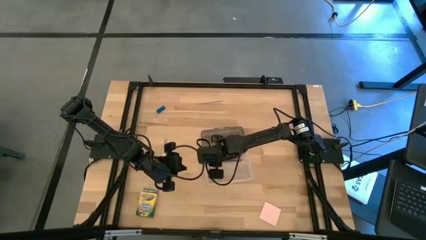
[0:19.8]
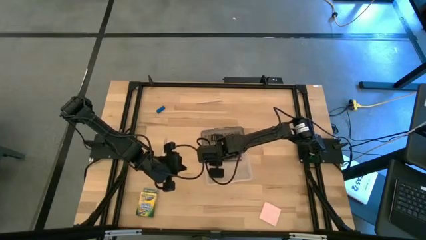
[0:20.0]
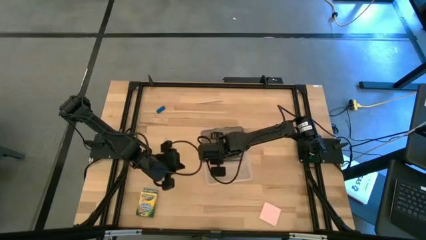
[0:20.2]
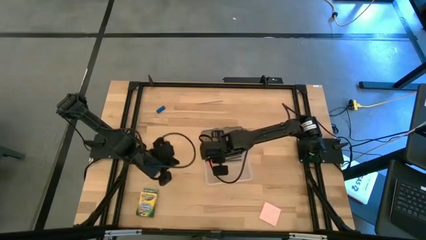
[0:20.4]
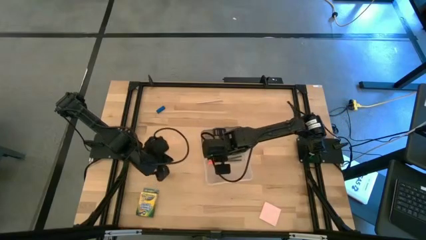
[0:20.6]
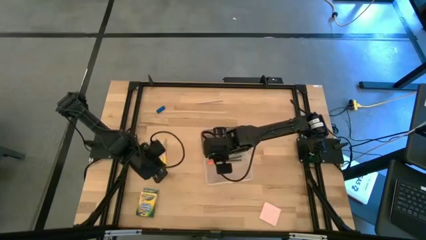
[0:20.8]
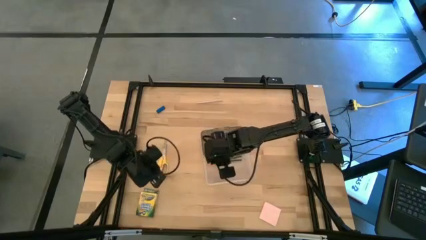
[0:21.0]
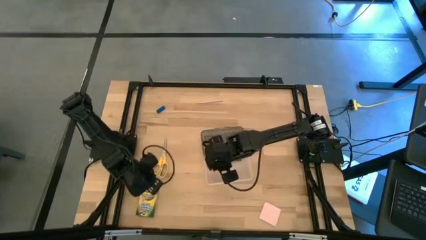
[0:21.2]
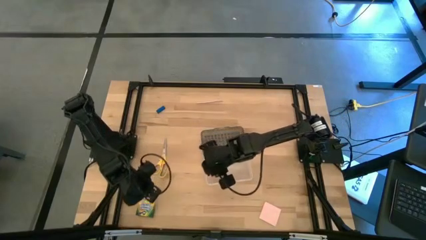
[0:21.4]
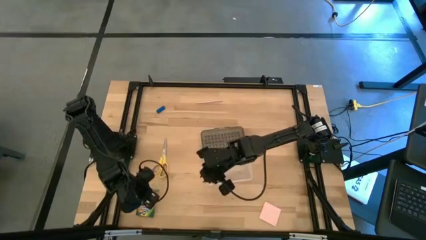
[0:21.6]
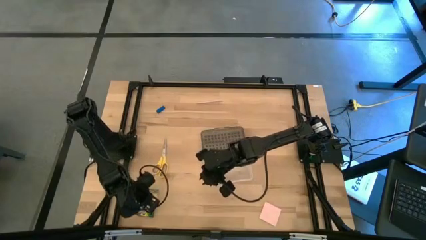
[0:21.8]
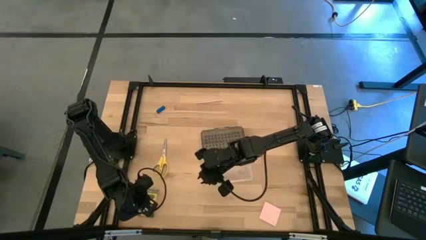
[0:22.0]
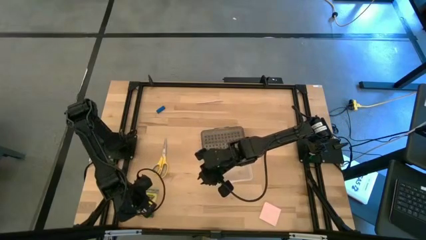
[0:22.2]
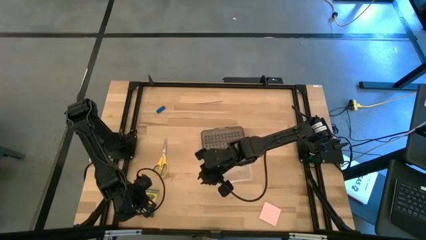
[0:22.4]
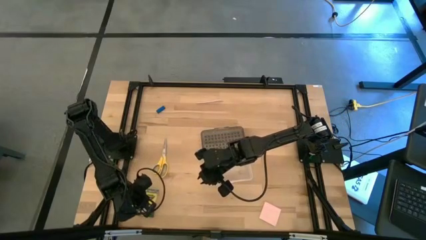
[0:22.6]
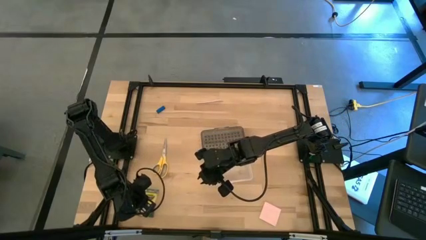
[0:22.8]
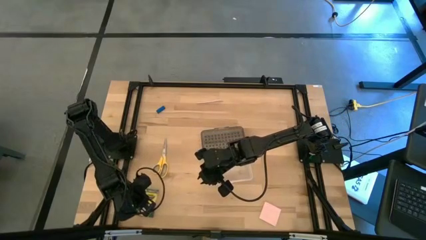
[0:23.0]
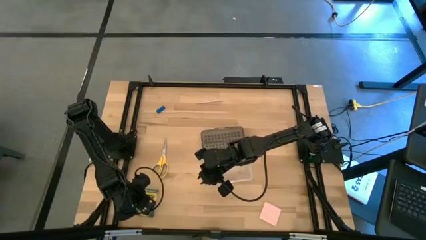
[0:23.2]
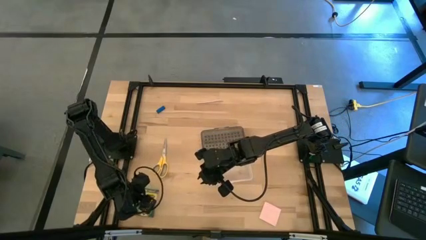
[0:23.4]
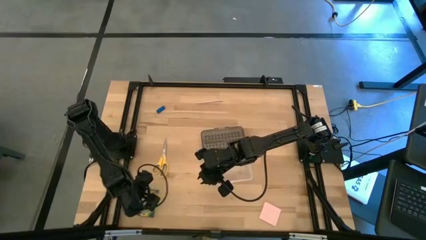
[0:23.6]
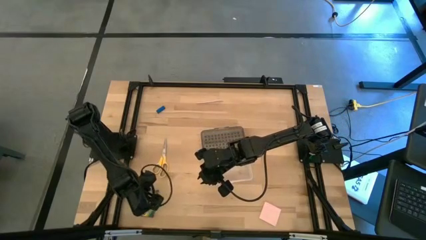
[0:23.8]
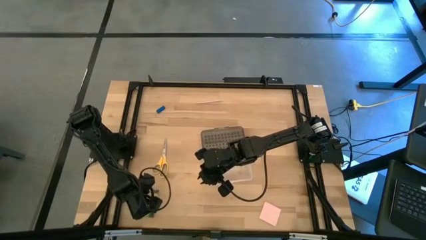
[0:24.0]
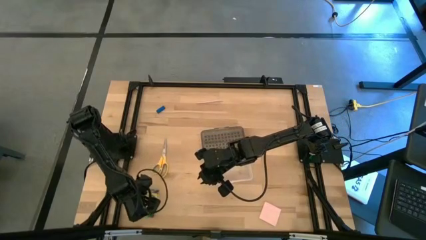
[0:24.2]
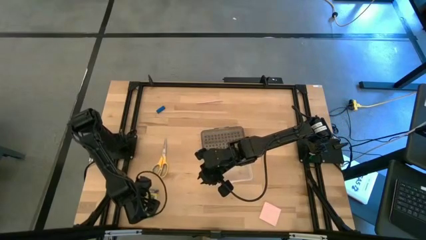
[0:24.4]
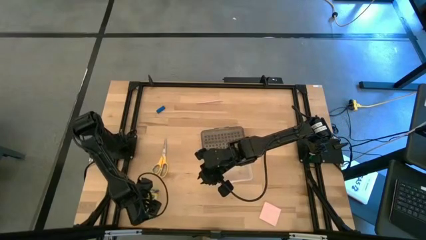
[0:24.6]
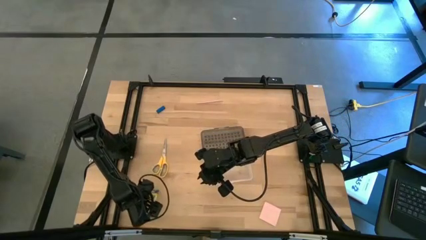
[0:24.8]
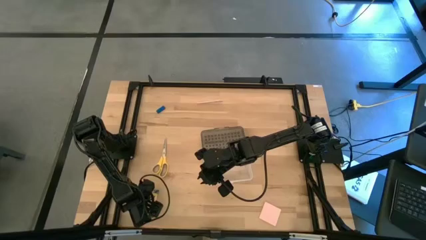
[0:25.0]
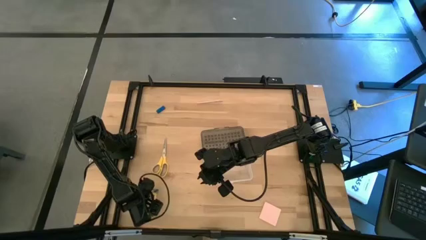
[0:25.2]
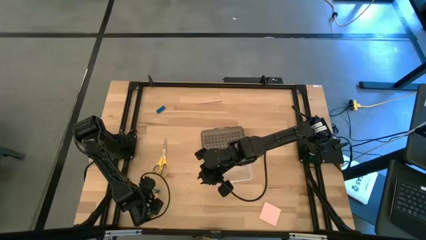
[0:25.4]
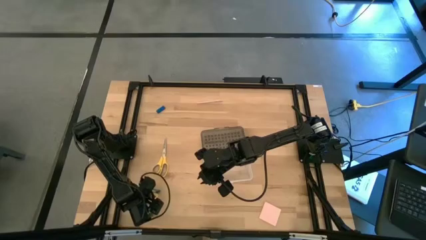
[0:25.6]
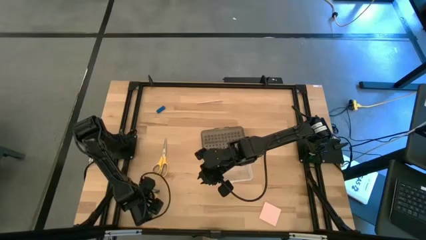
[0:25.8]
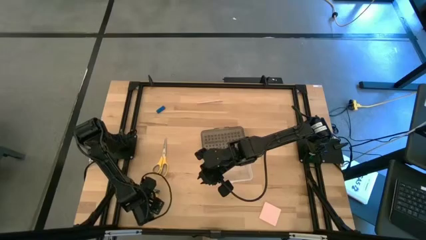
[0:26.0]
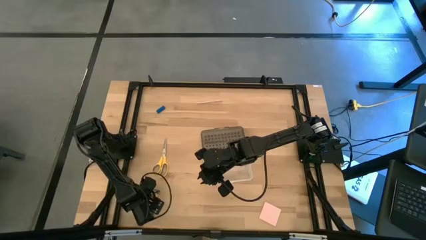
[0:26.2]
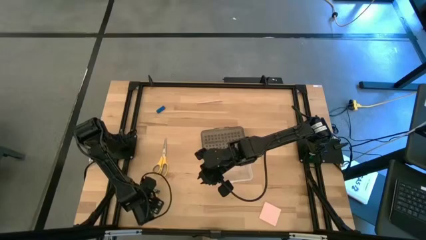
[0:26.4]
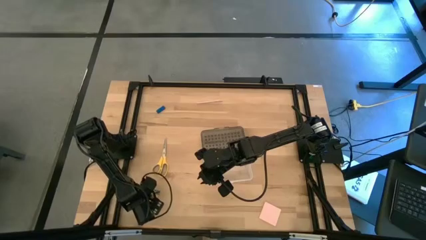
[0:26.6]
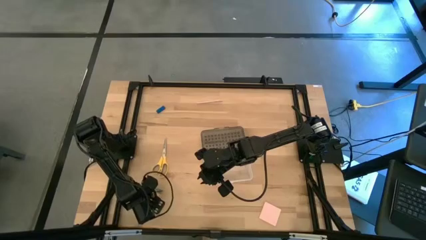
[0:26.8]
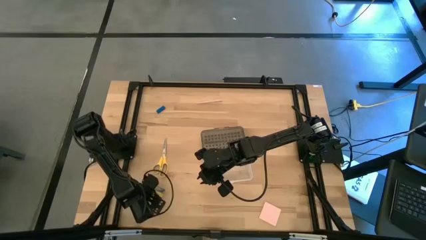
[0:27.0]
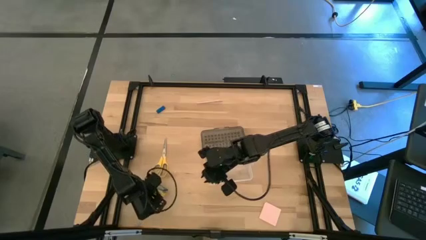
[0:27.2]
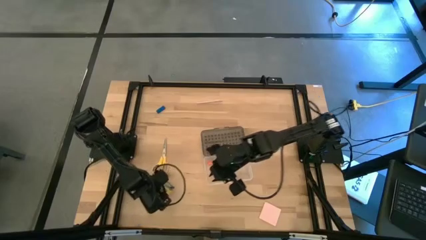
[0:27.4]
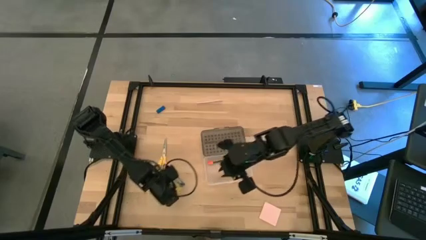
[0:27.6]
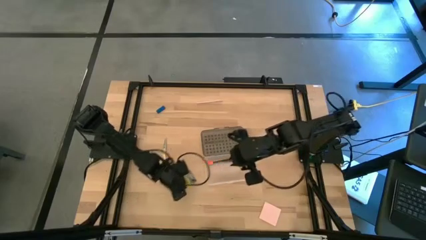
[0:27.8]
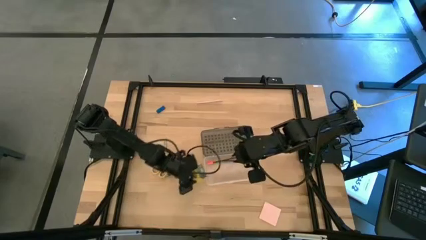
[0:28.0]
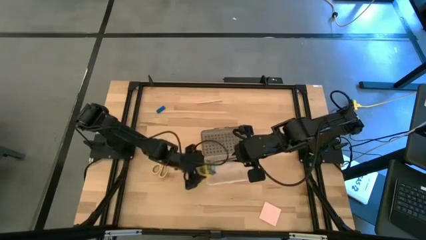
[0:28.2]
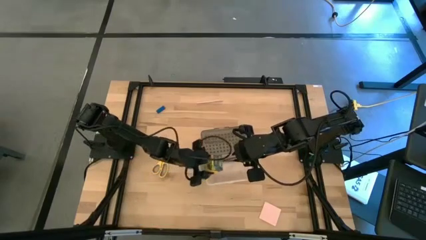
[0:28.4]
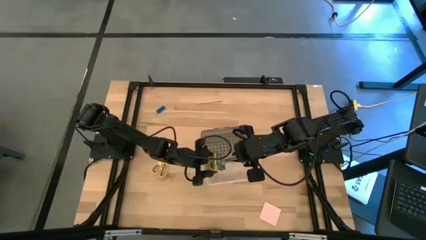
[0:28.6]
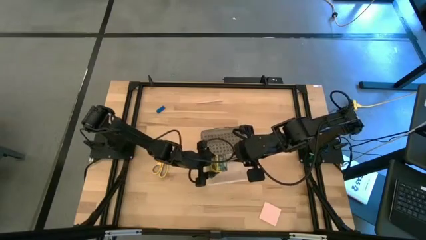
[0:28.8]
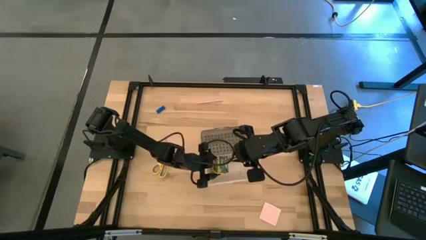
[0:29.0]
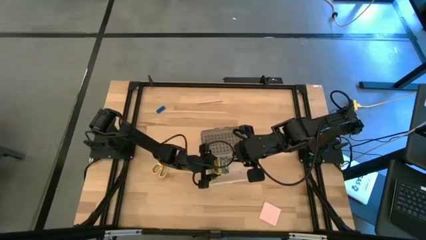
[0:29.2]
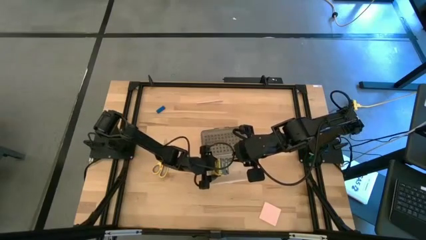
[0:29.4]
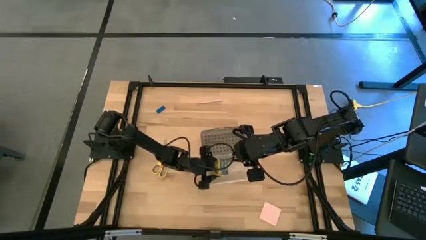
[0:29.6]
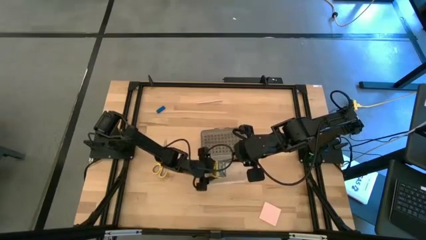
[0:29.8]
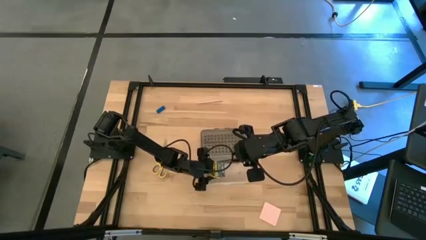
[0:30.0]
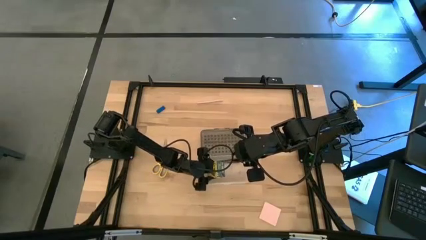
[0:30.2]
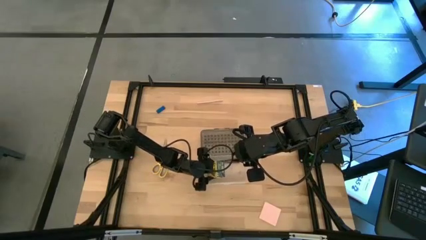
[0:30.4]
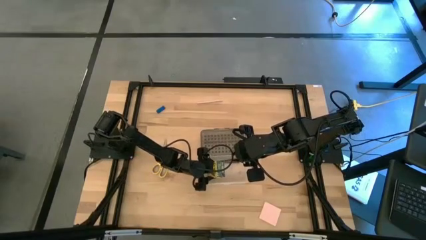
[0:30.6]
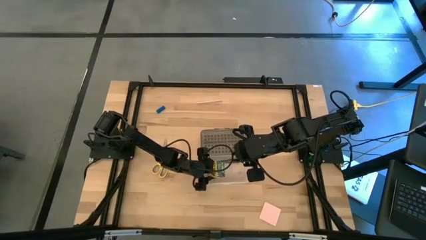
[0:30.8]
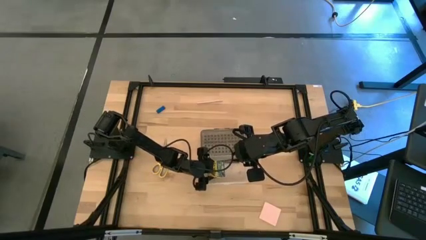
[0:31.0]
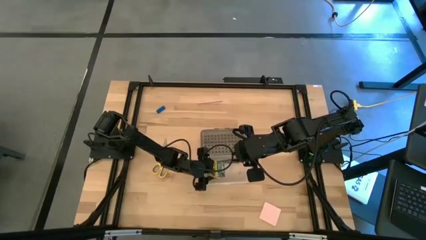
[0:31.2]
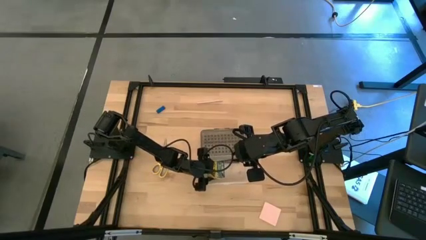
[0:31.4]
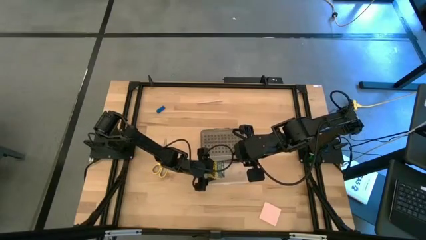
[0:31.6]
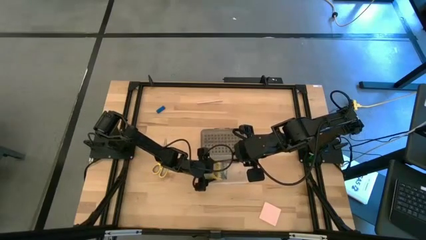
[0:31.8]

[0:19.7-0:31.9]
Task: Pack school essentials
Put the yellow box of crayons into the transparent supply box

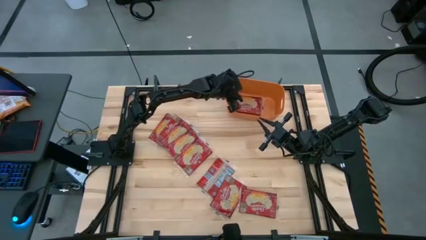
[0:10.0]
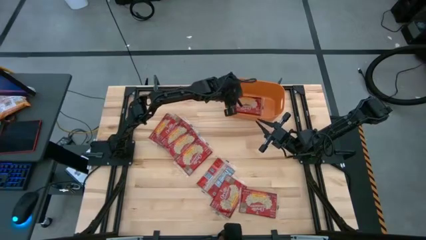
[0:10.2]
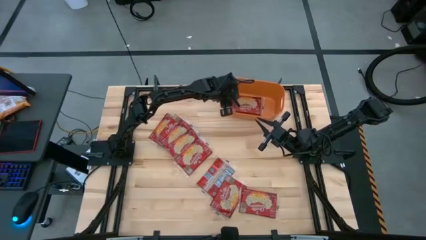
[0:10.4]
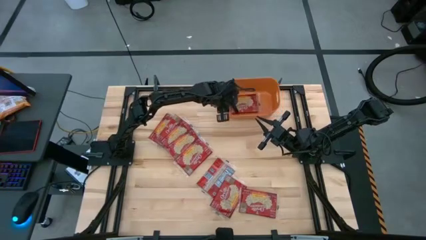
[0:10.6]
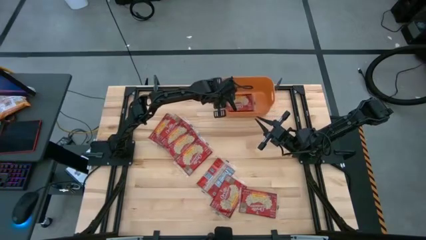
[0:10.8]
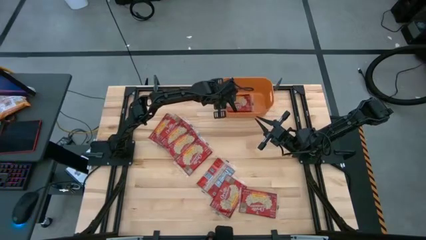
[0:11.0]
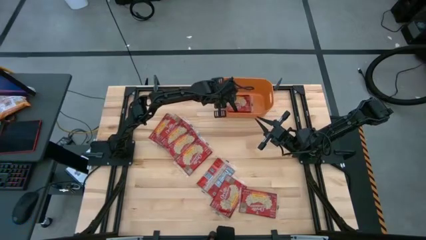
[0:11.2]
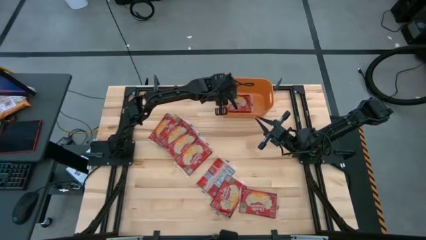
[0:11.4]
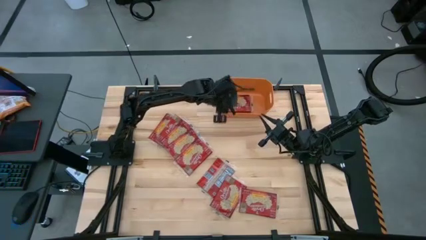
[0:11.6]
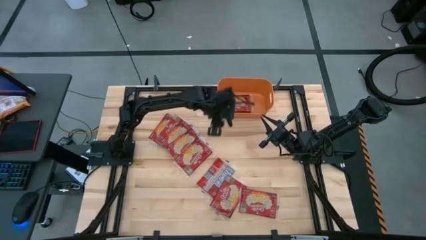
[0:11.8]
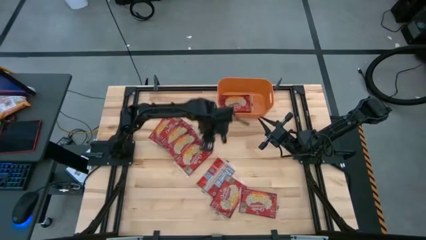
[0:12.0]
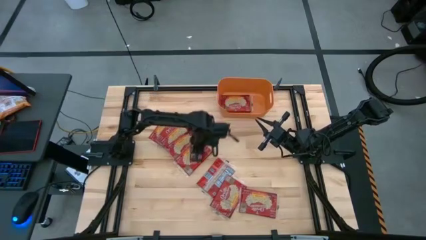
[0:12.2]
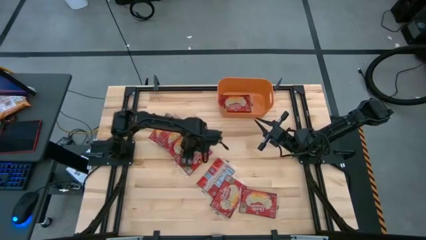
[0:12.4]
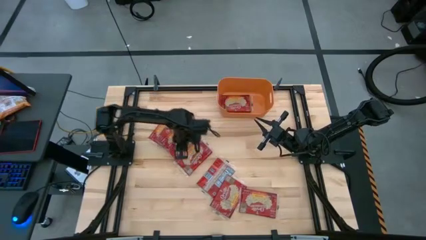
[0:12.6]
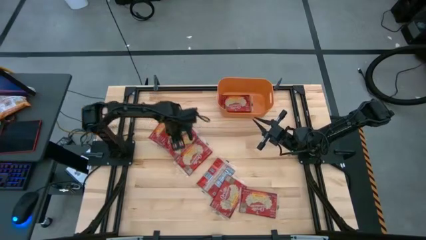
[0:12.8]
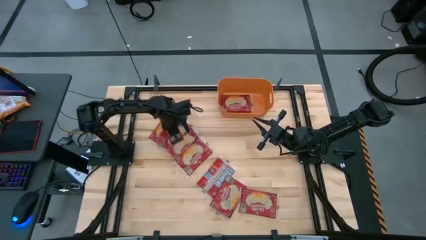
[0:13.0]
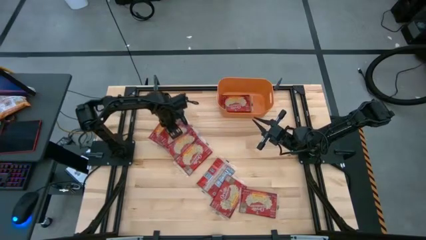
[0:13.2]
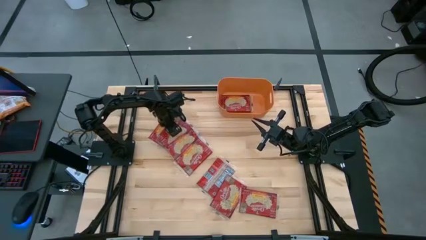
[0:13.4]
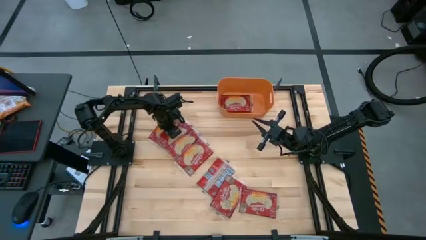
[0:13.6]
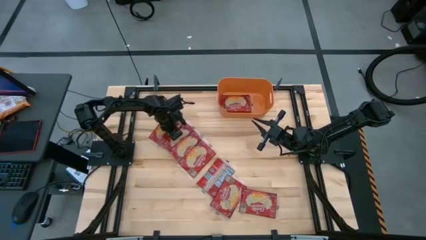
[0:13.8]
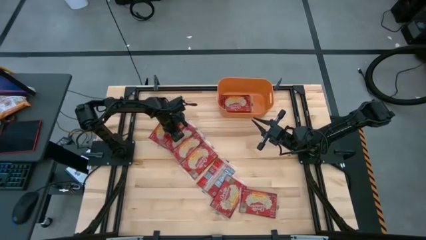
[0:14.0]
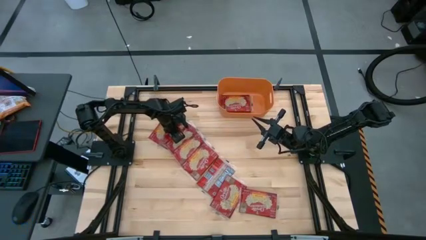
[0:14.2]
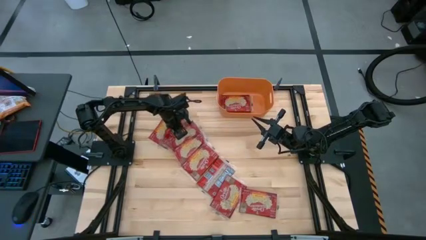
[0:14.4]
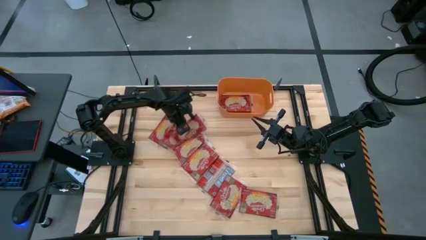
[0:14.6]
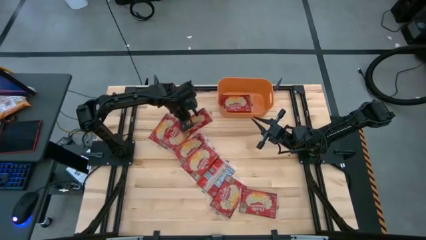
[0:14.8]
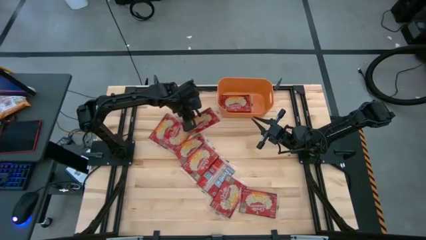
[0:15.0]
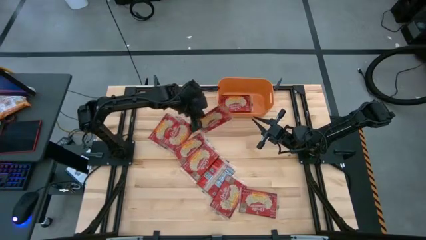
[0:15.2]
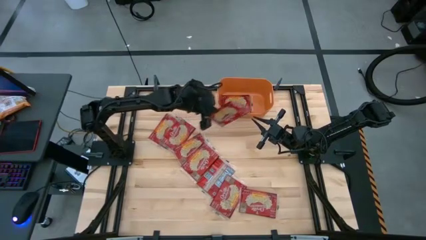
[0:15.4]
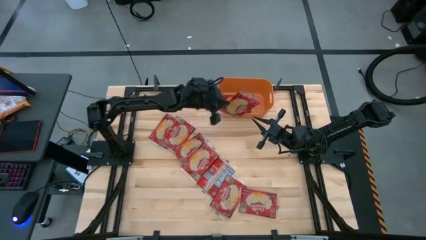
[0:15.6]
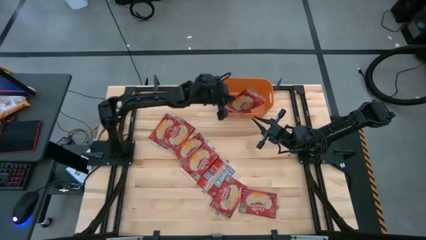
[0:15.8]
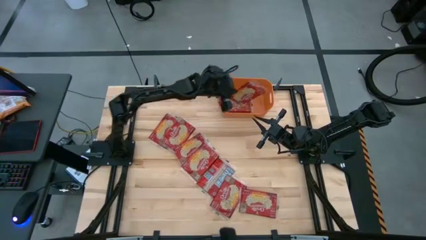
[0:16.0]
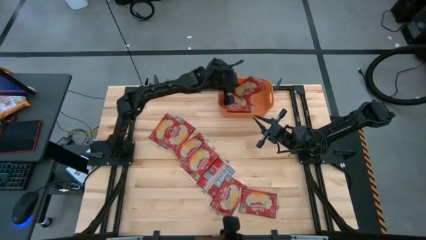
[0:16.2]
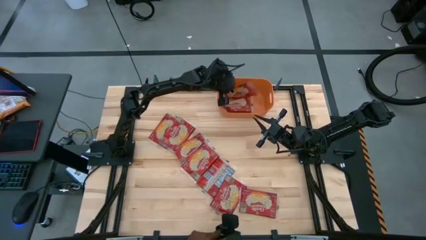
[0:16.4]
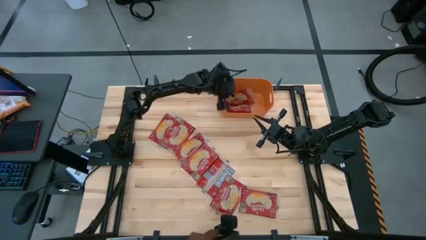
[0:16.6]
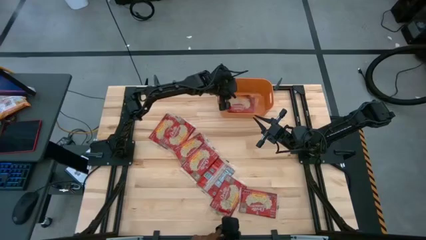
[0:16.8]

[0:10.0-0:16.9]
Task: Sort popcorn bags into baskets
Put the popcorn bag into the bin
